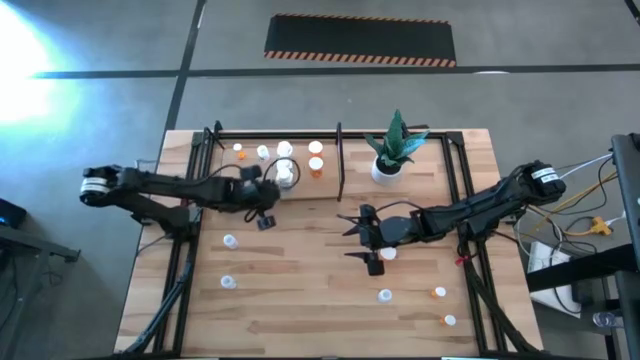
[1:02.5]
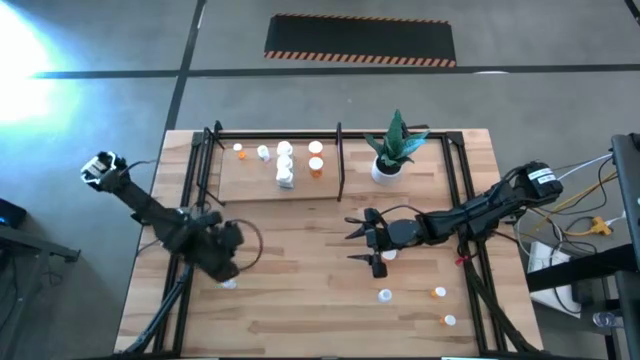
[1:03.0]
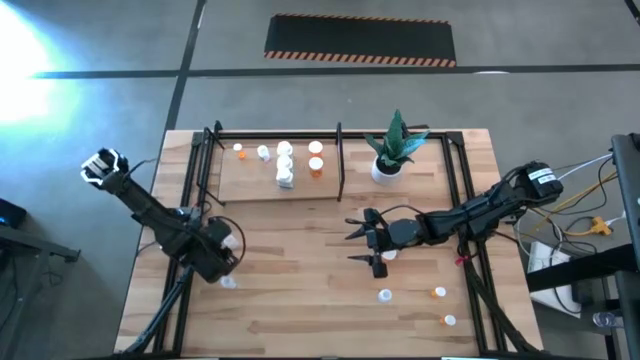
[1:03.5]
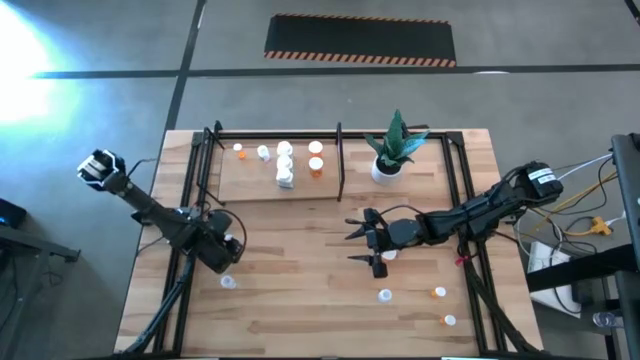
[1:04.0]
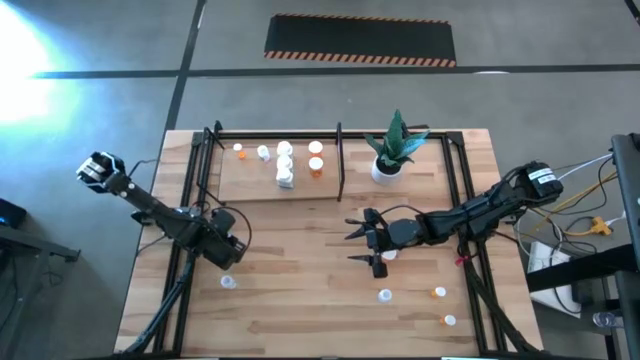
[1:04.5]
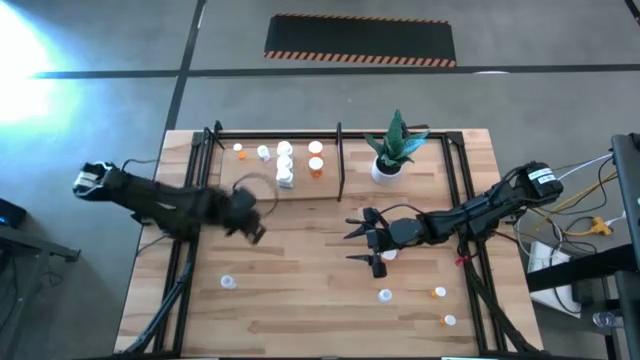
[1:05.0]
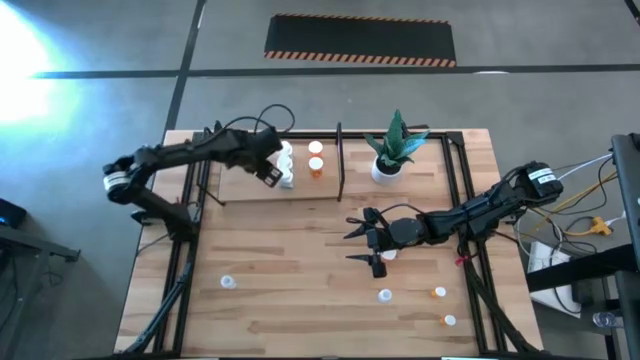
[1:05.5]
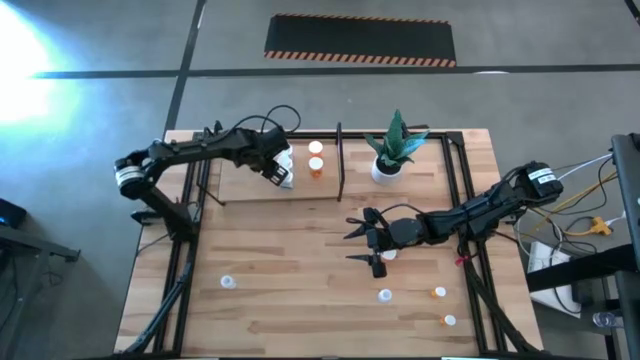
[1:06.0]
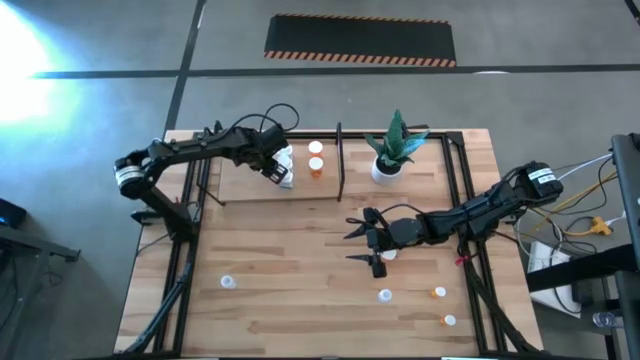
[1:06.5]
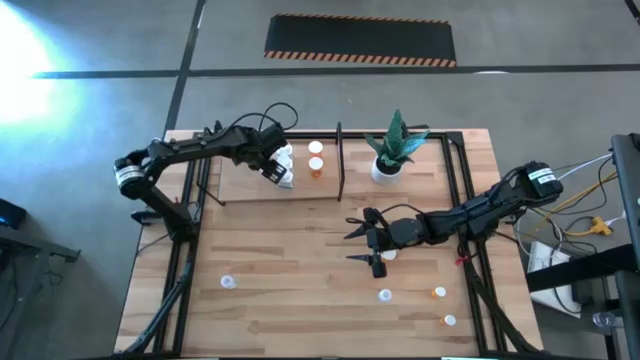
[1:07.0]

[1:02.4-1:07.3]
Task: Pick and place medicine bottles onto shelf by color
Put the transparent medicine container onto the shelf

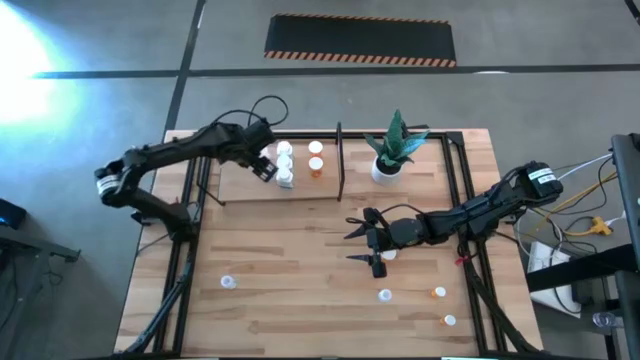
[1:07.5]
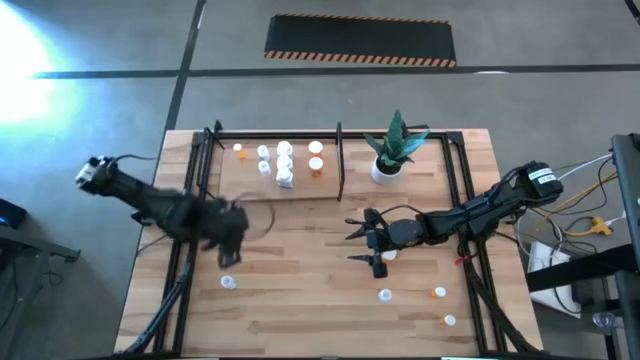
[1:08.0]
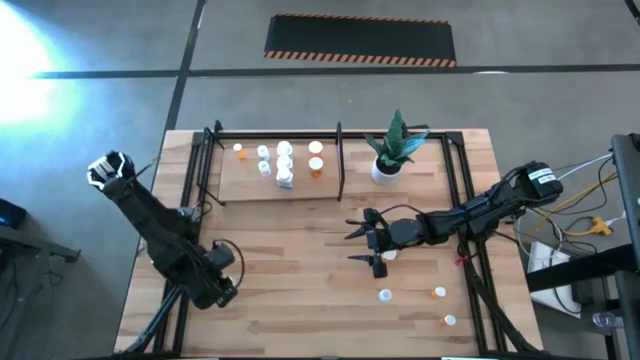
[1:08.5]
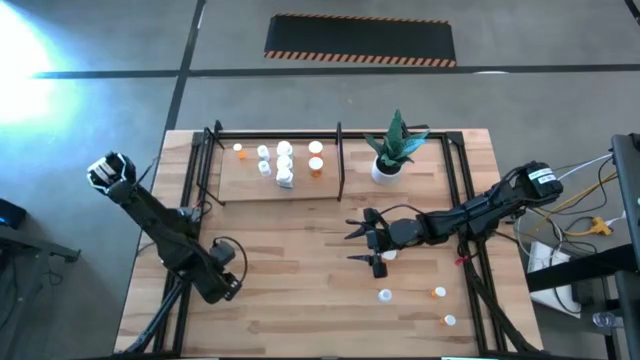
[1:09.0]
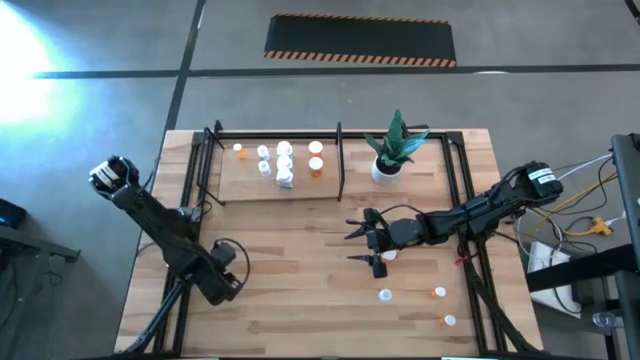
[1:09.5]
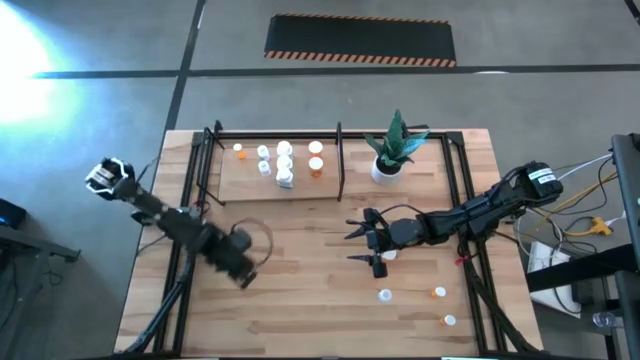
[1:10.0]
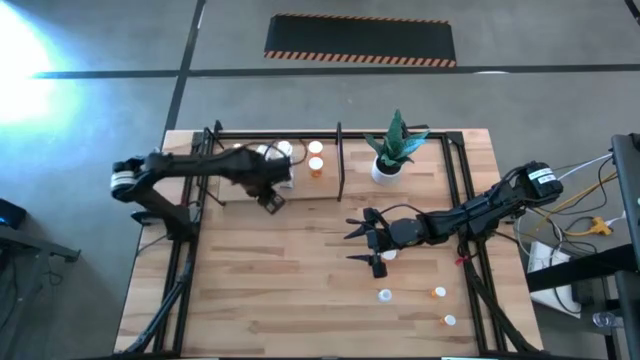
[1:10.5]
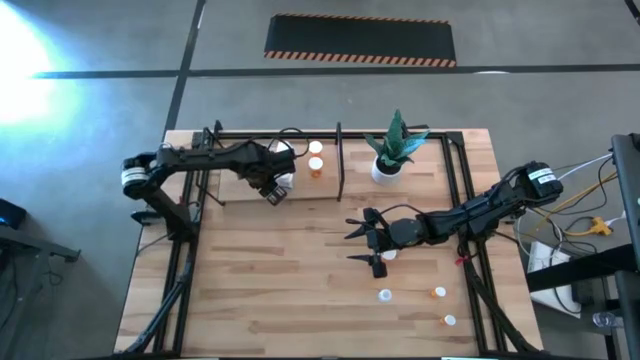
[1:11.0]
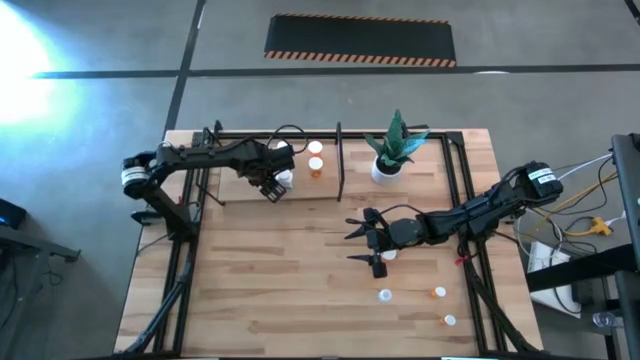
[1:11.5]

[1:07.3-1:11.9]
Put the transparent medicine container onto the shelf

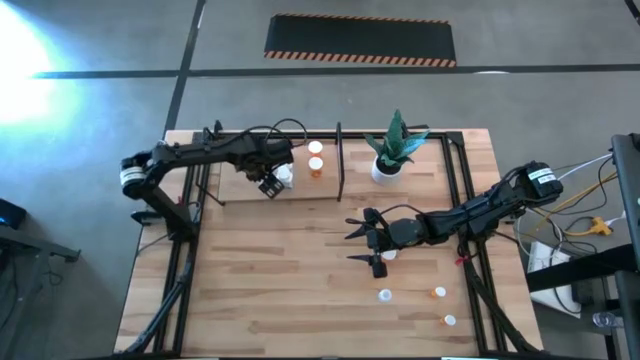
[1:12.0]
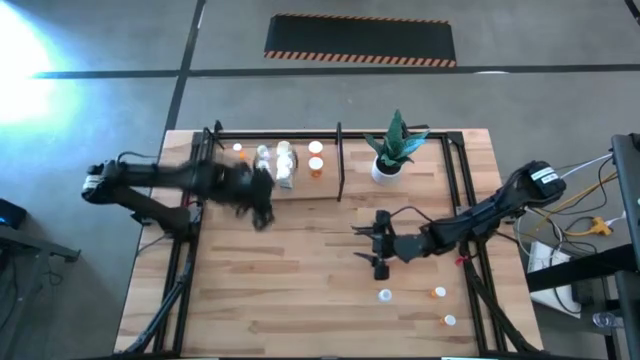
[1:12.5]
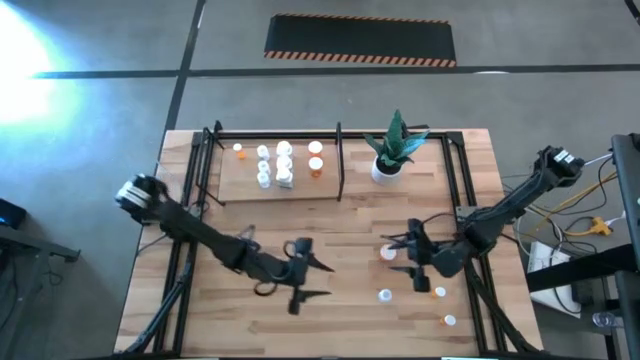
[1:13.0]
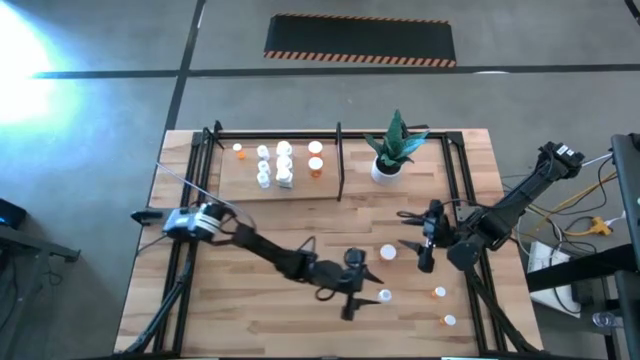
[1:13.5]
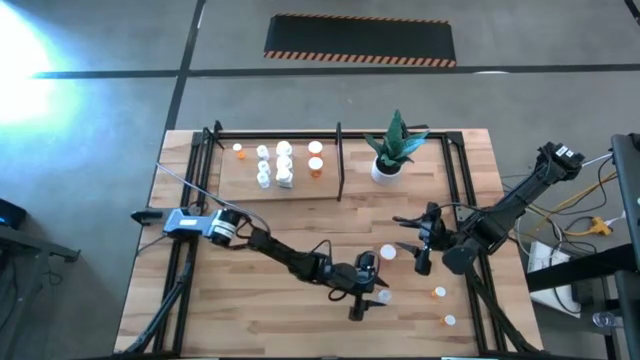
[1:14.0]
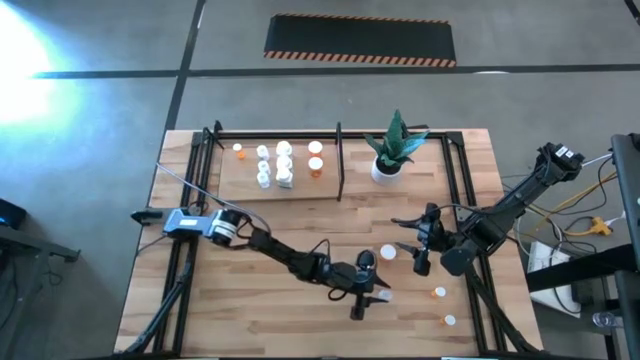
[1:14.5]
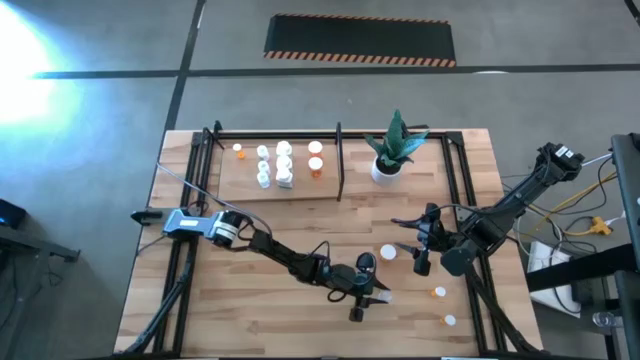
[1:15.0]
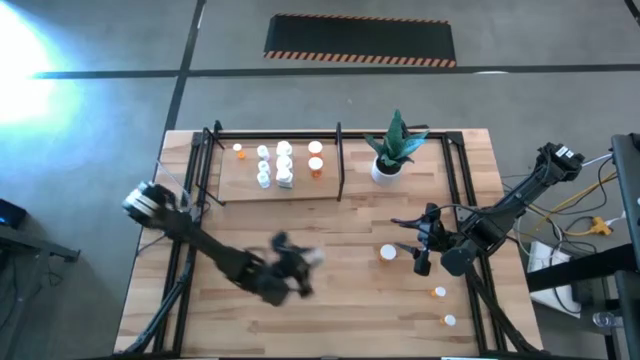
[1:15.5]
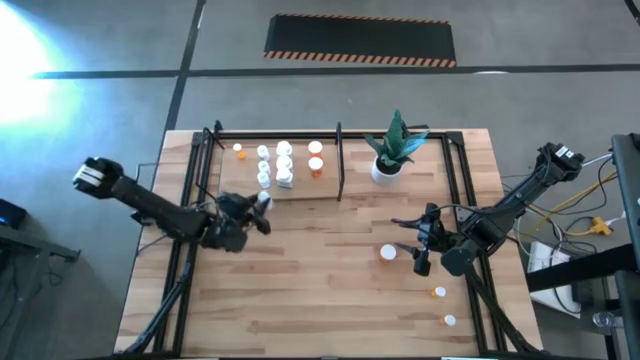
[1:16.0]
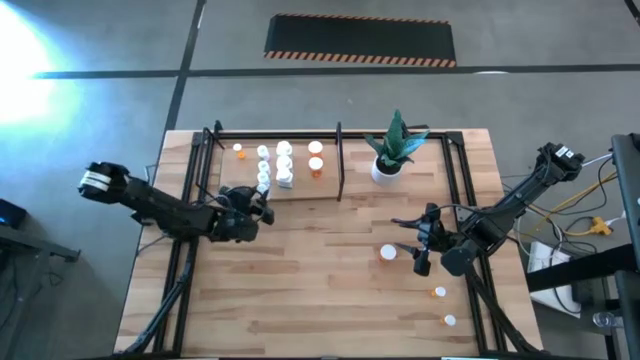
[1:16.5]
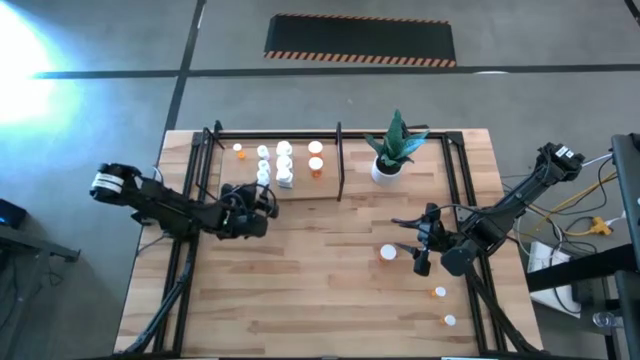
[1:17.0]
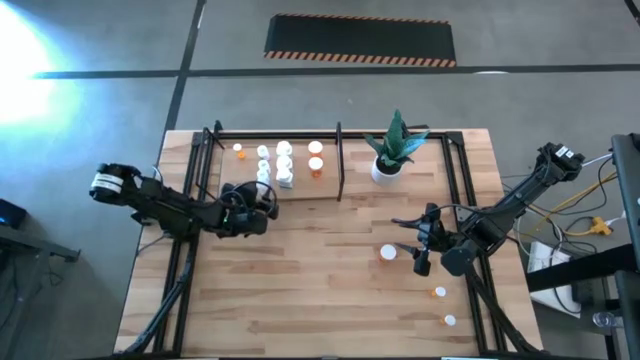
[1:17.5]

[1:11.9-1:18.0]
Put the transparent medicine container onto the shelf

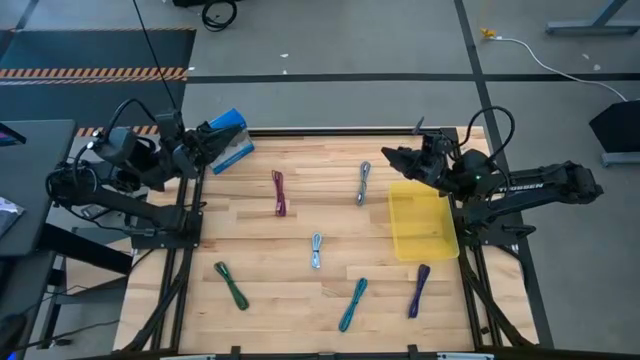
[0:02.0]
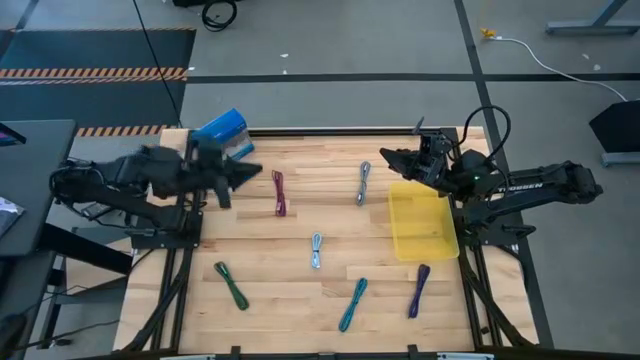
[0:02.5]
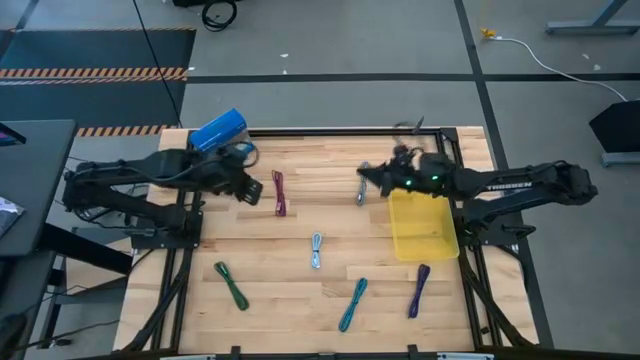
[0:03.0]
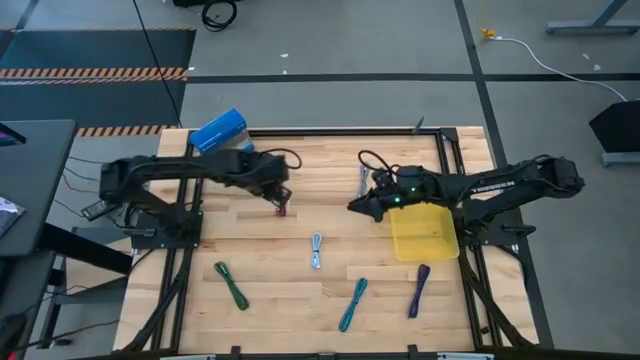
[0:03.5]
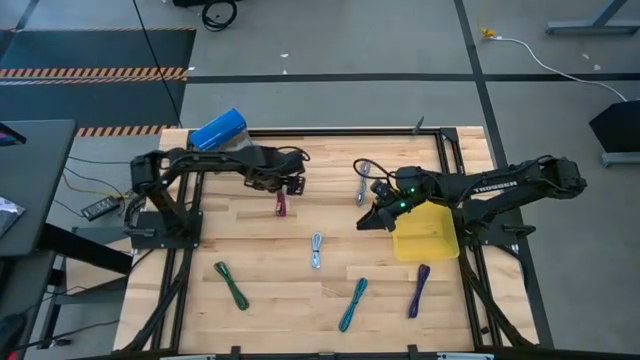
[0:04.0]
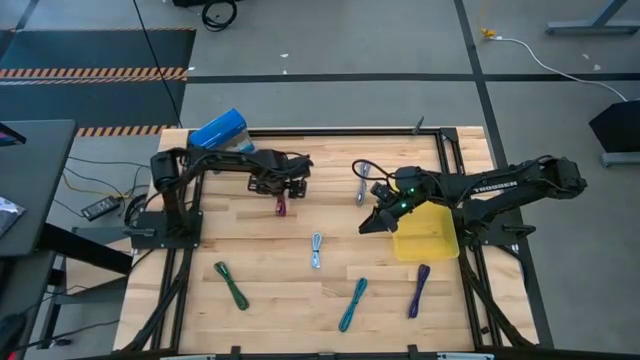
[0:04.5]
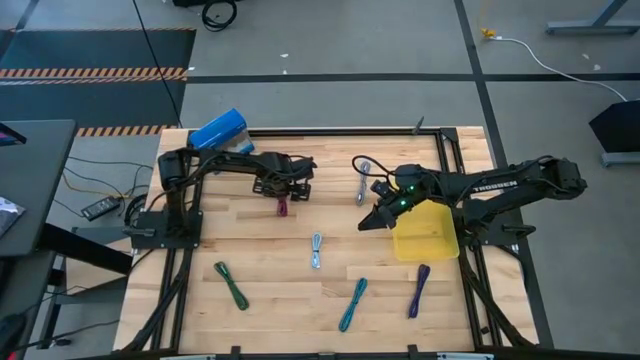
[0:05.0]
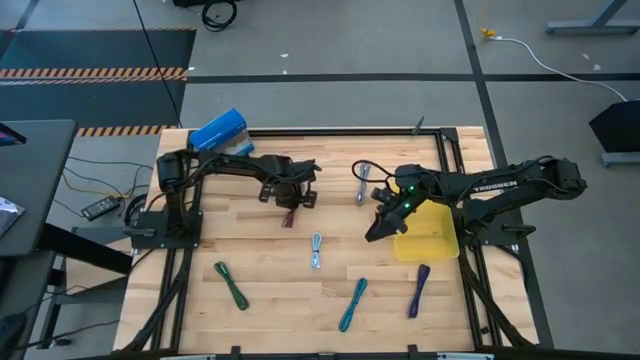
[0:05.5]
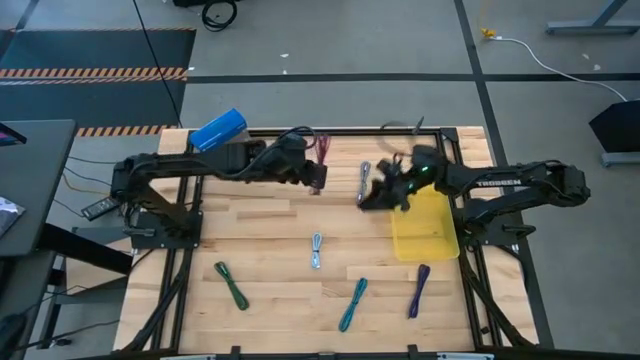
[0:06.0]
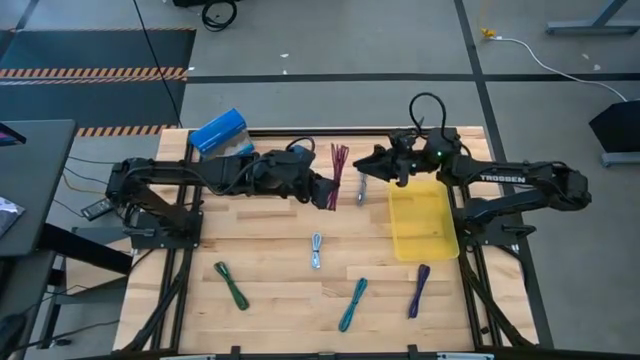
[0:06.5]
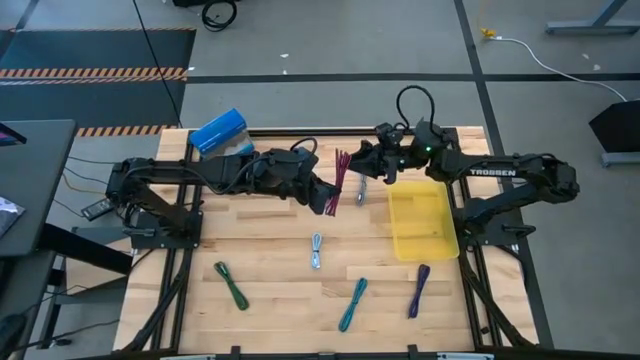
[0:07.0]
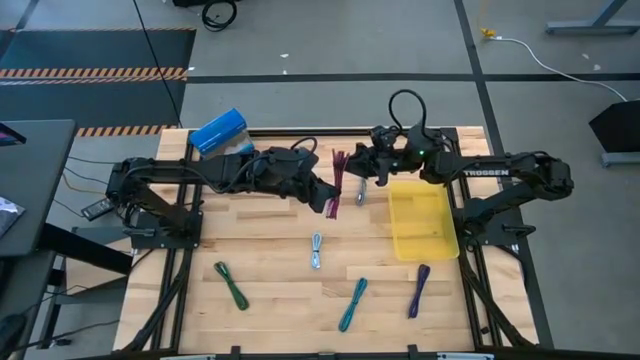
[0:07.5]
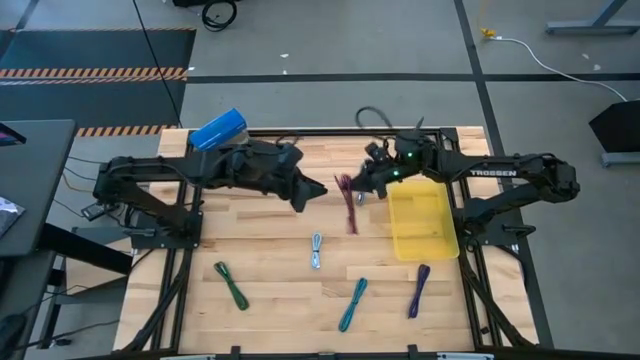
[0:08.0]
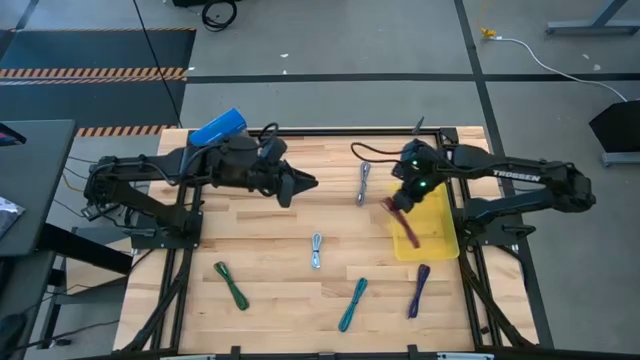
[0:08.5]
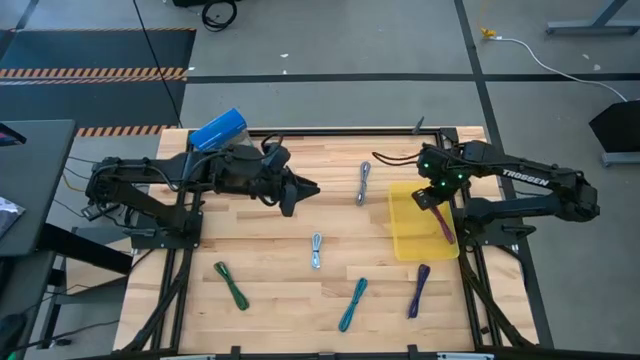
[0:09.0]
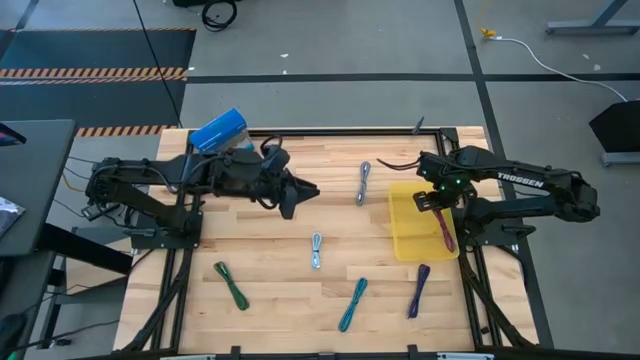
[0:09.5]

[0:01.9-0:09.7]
Task: Pick and place USB-C Cables
Put the pink USB cable into the yellow container
